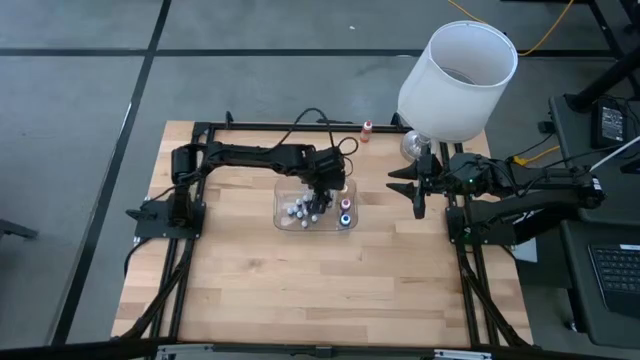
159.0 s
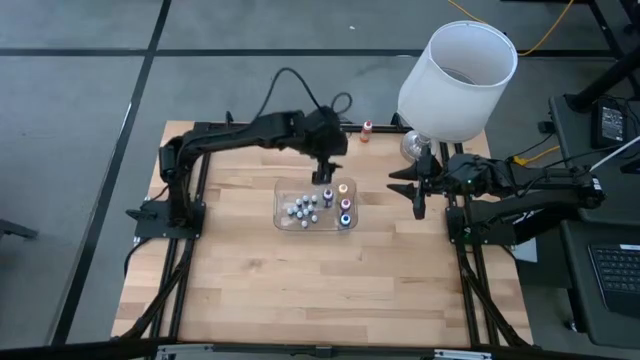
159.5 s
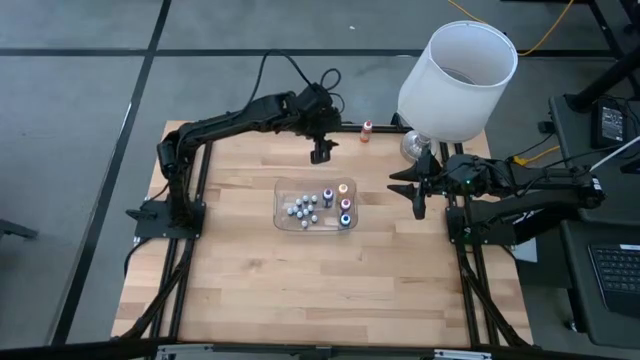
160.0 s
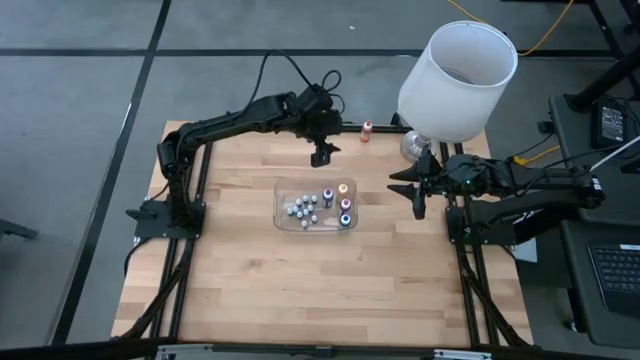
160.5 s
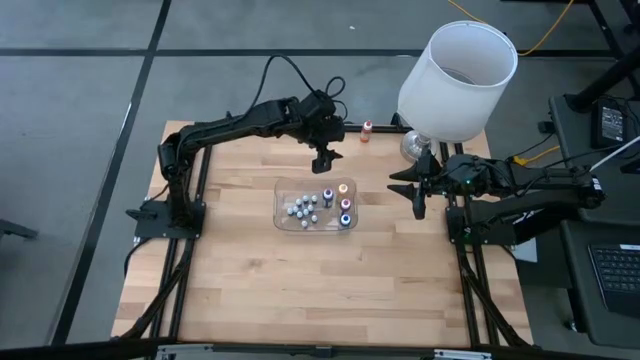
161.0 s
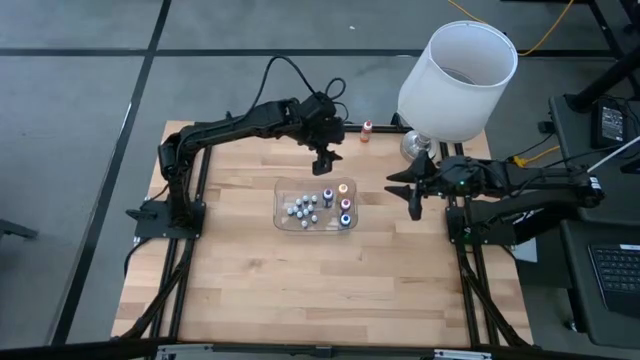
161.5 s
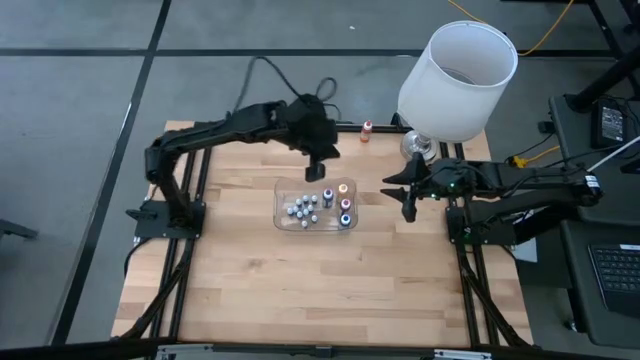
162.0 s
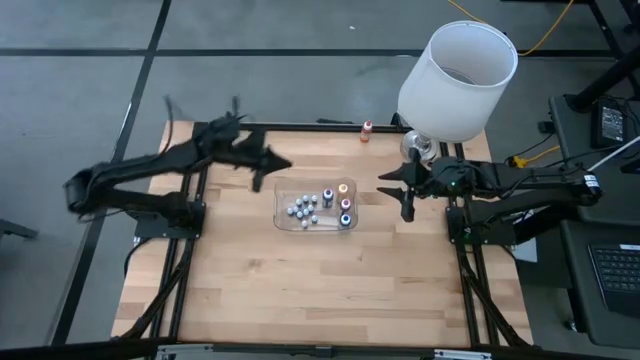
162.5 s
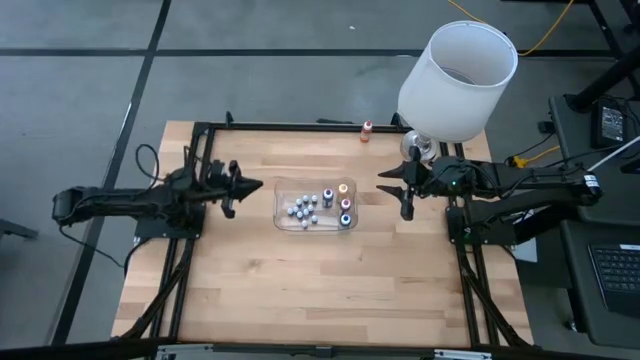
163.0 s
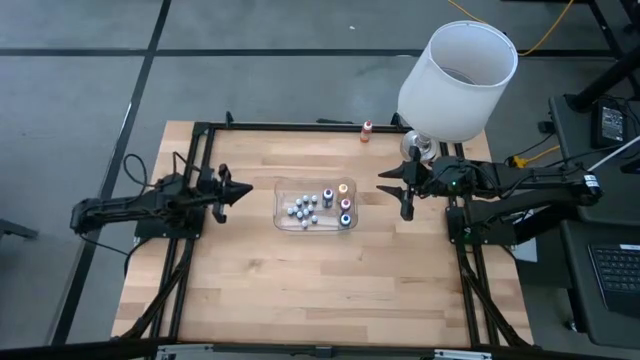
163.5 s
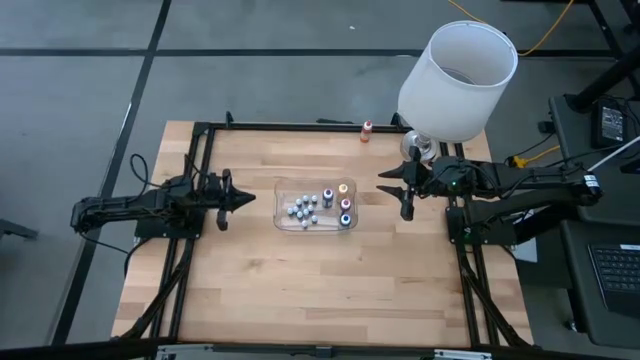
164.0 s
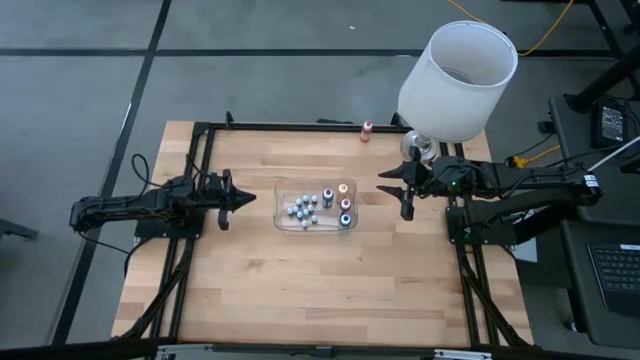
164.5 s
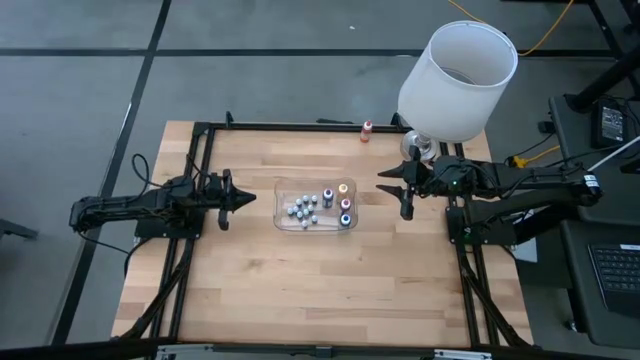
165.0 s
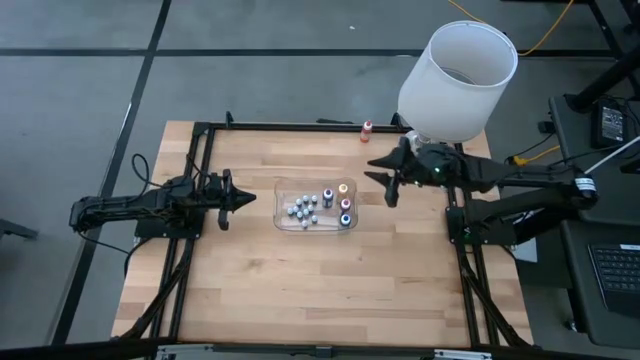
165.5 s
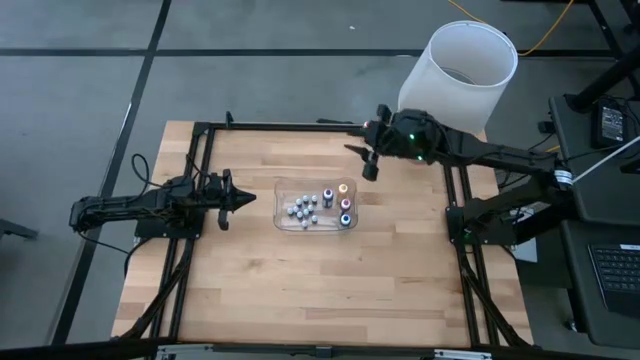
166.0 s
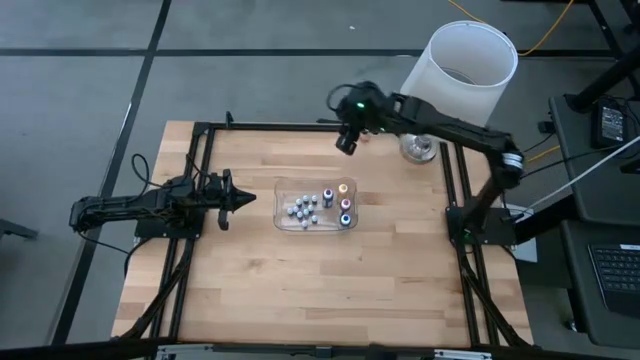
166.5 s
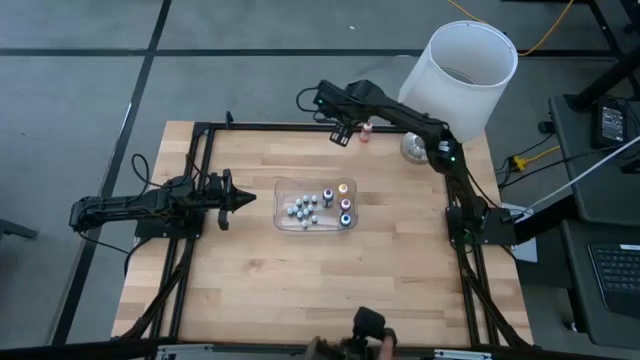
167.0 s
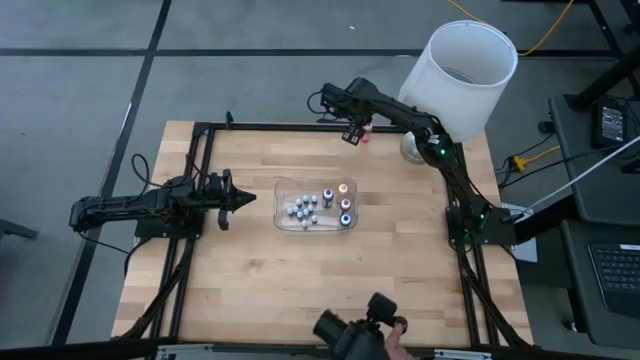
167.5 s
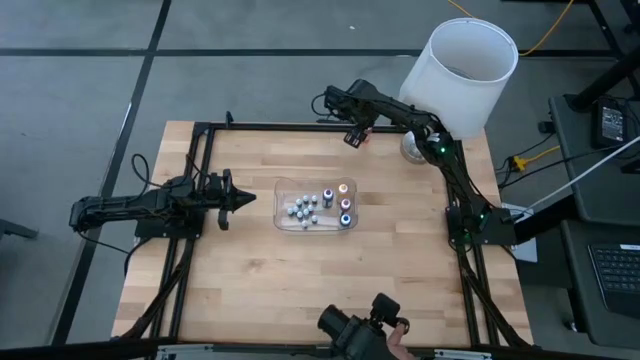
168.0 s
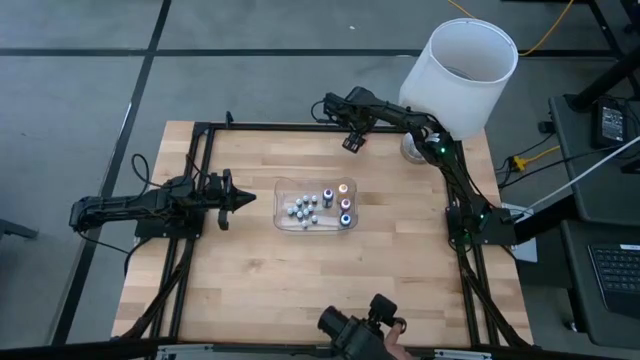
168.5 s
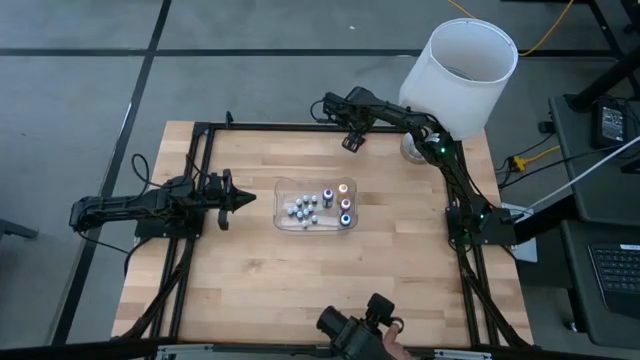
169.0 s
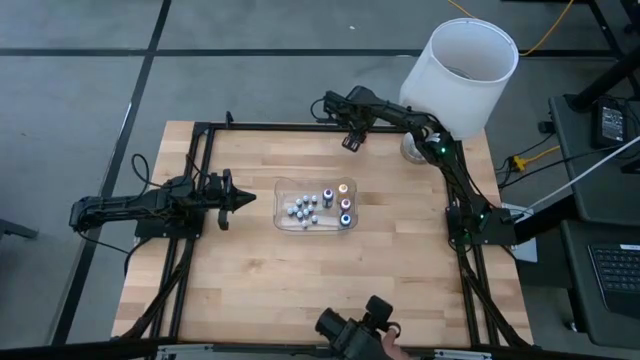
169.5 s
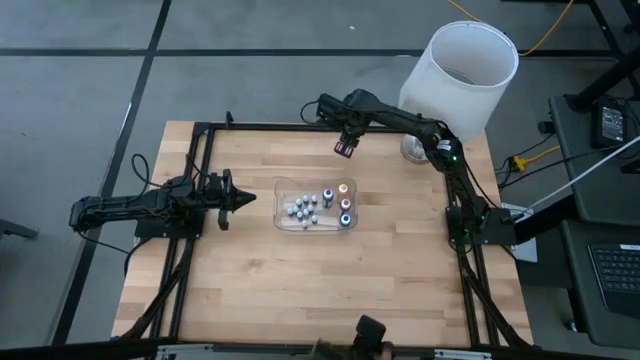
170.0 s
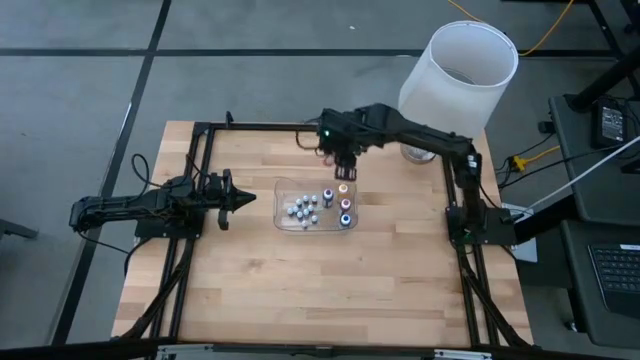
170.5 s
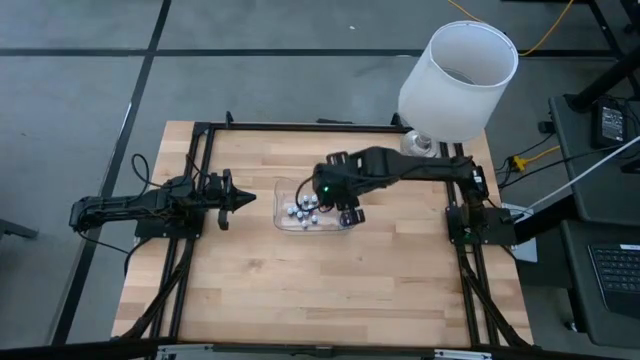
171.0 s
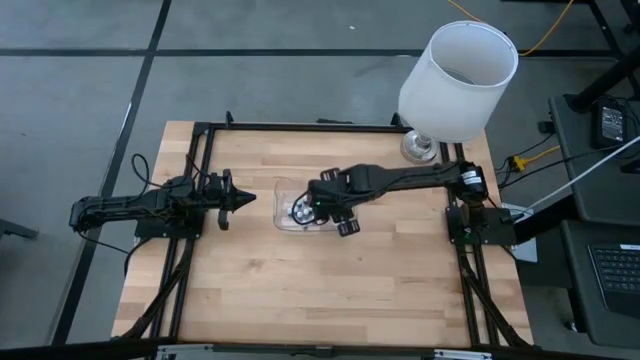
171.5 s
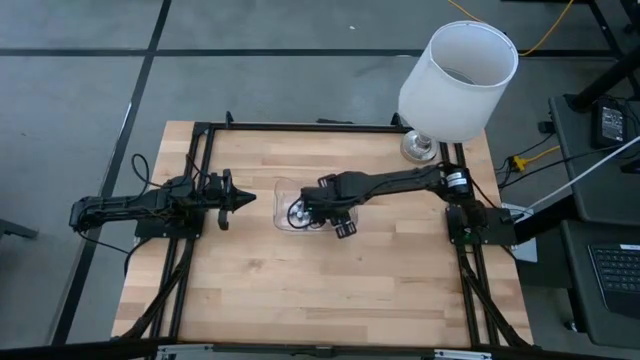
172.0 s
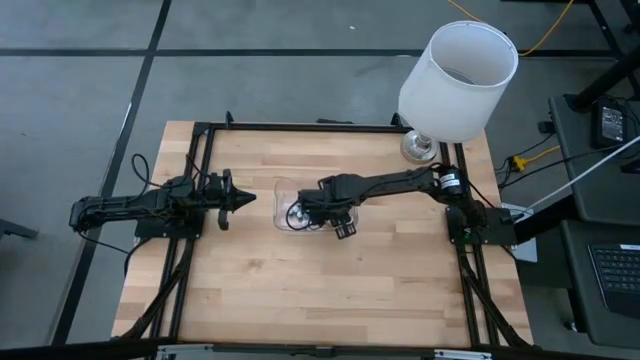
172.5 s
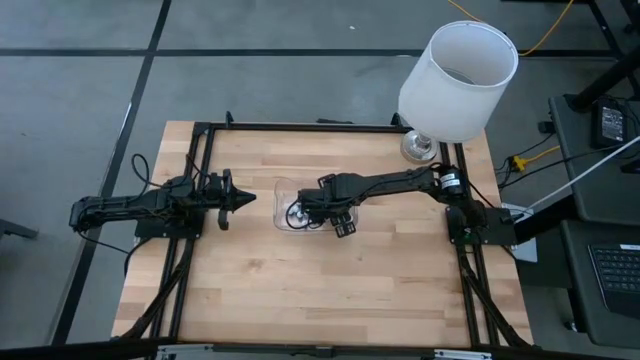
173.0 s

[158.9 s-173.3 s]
Task: Pick & Place food coloring
Put the large orange food coloring bottle into the transparent bin

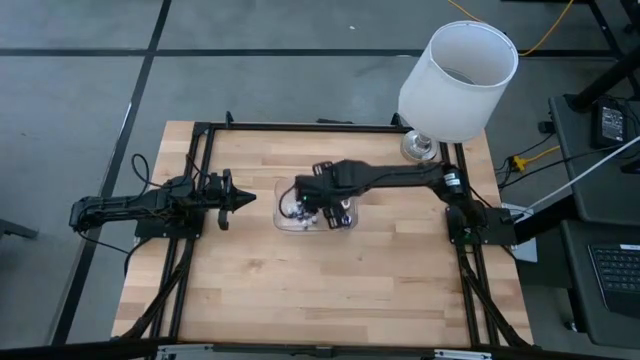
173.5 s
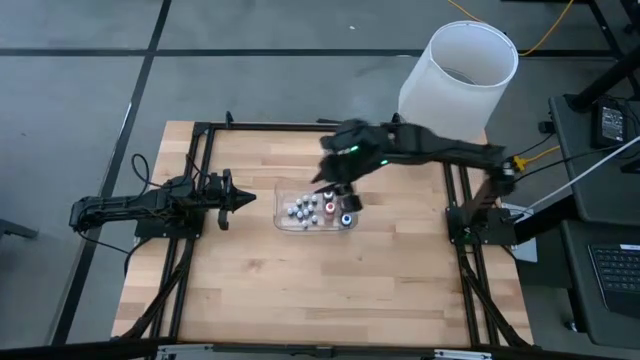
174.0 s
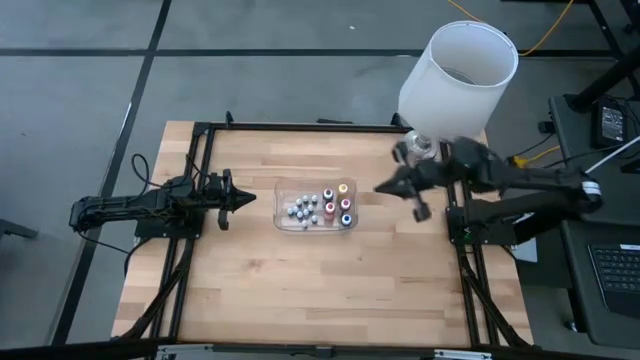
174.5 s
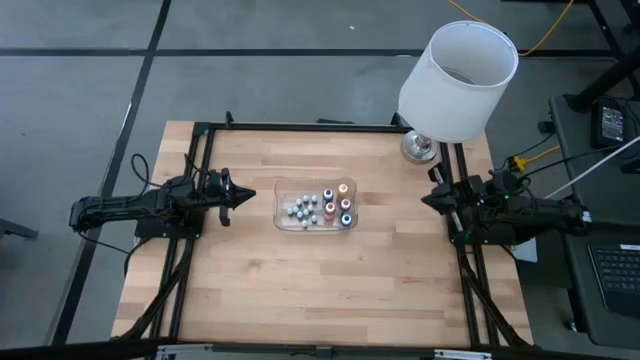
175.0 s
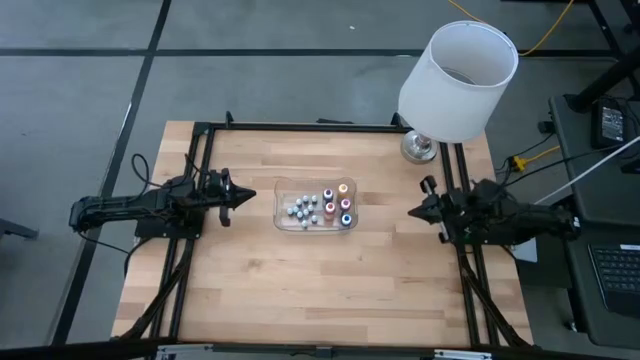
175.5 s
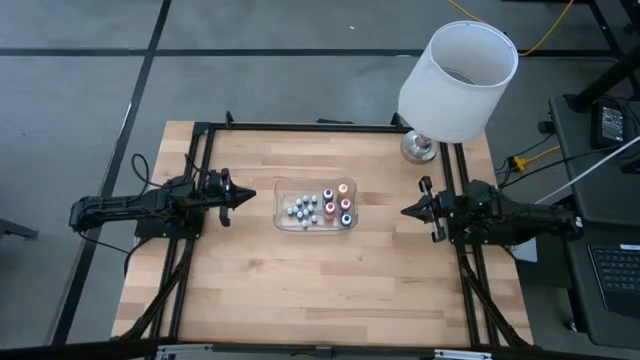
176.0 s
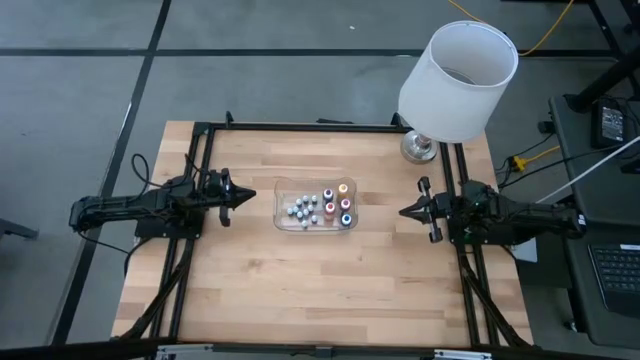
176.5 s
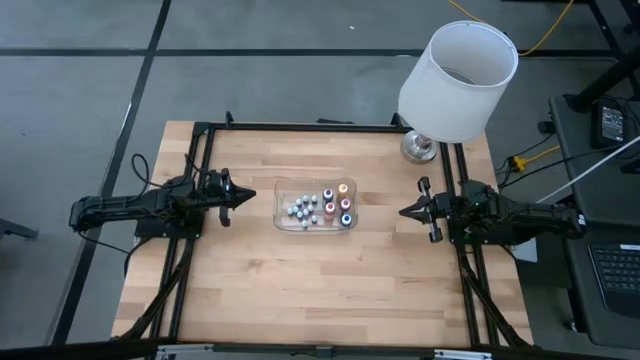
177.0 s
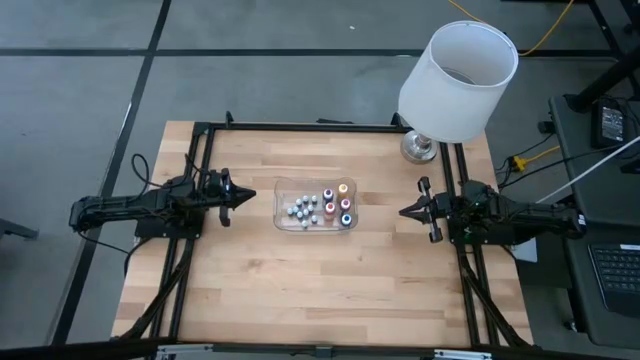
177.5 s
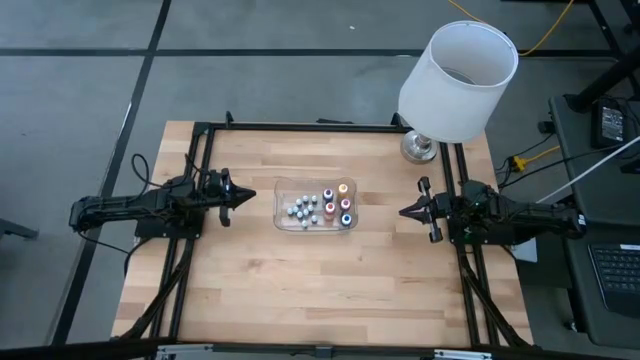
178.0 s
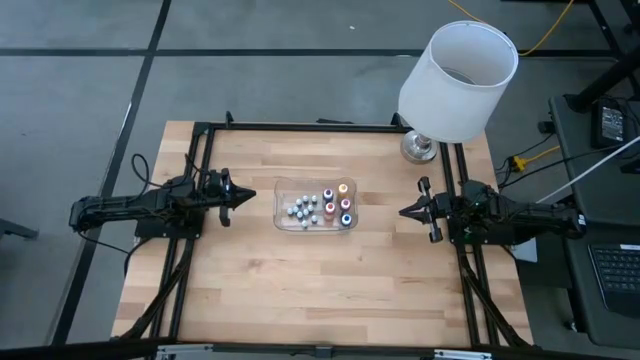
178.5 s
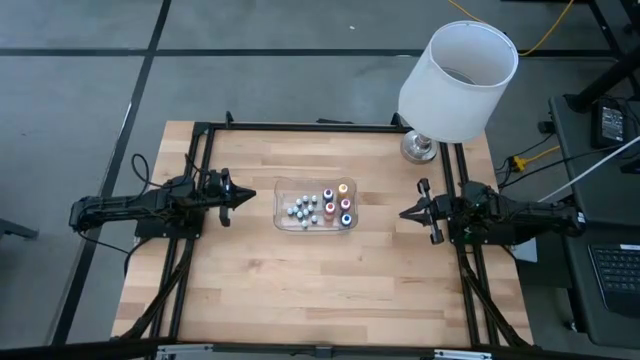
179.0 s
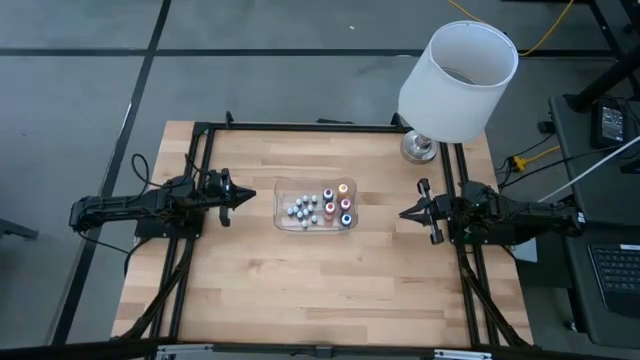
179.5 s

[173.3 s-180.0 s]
Return to Home Position
